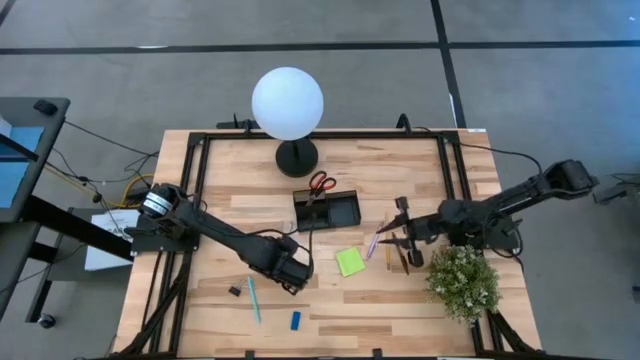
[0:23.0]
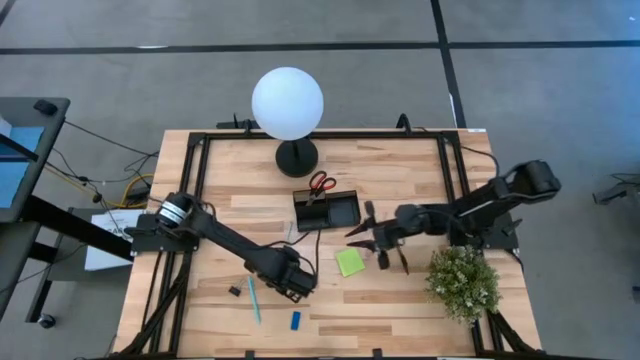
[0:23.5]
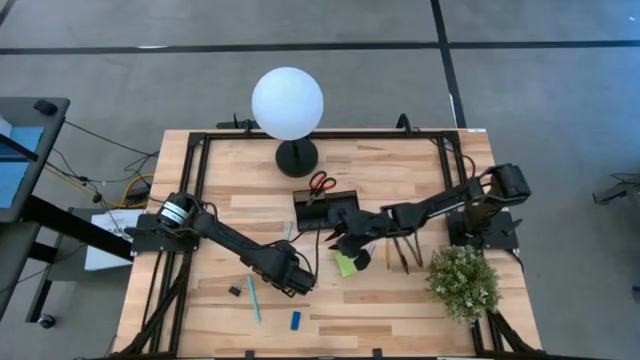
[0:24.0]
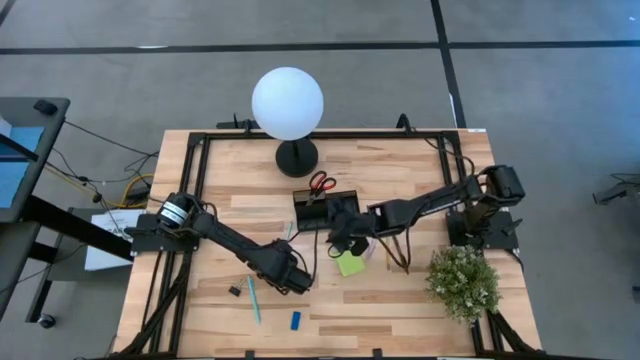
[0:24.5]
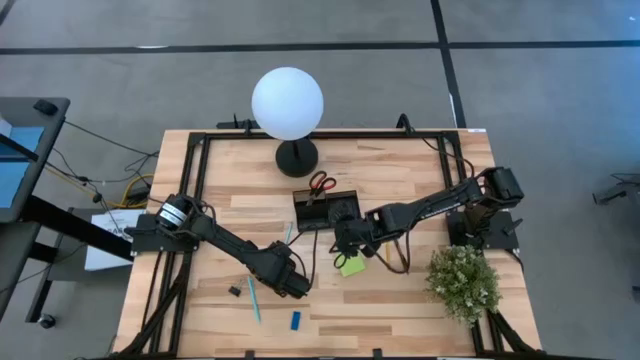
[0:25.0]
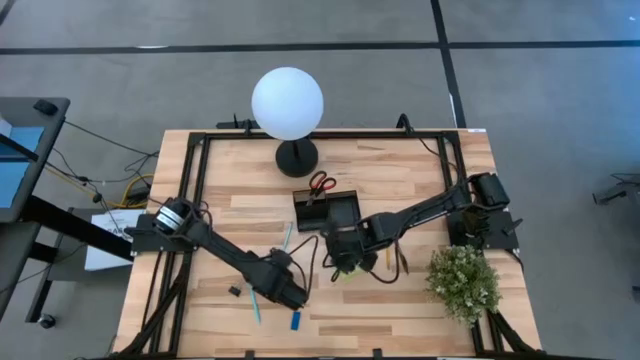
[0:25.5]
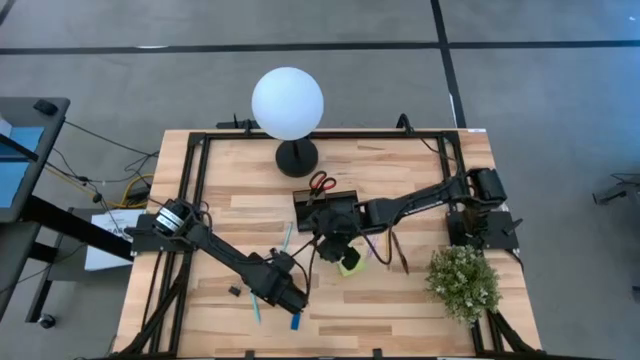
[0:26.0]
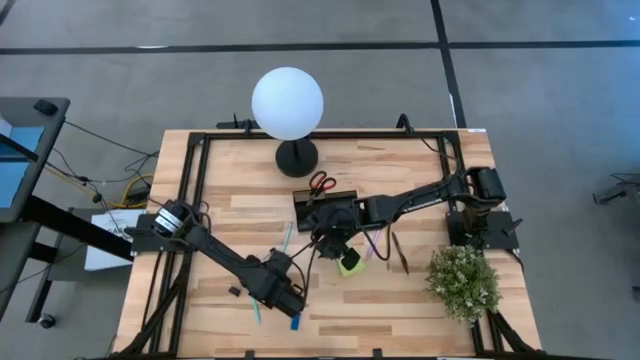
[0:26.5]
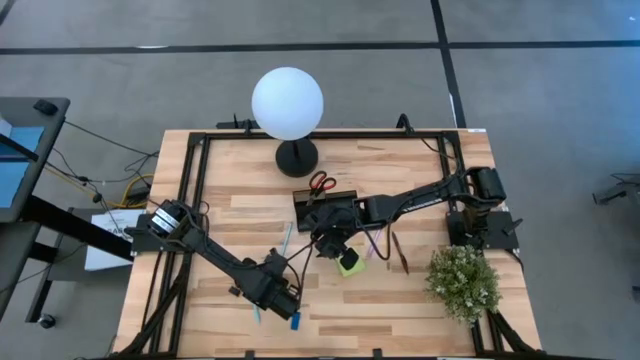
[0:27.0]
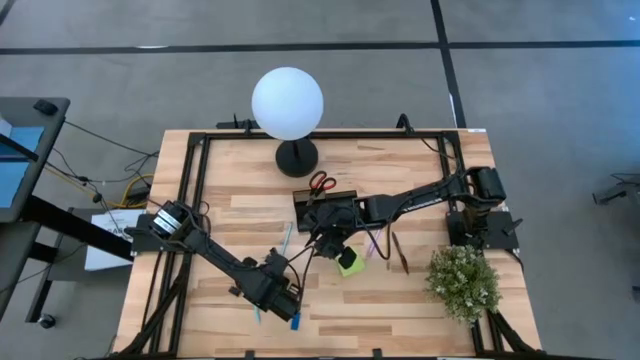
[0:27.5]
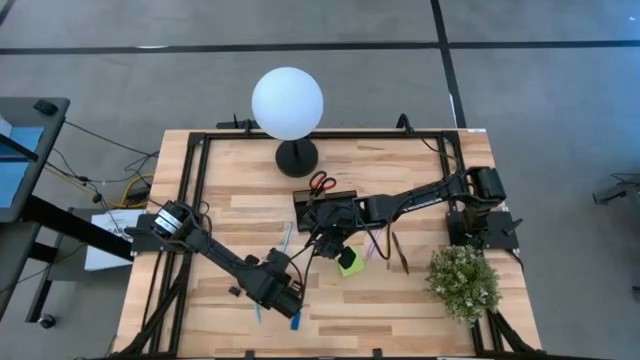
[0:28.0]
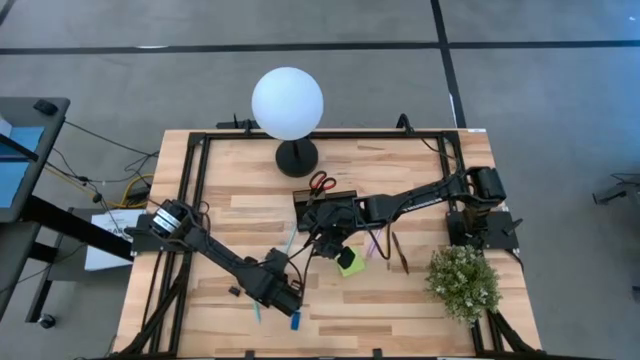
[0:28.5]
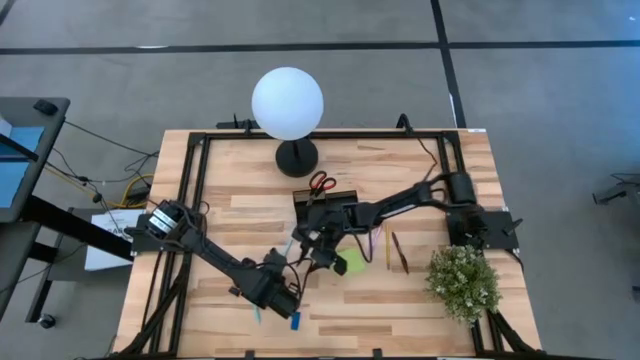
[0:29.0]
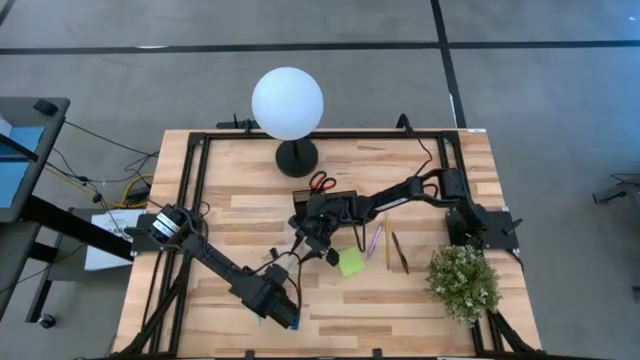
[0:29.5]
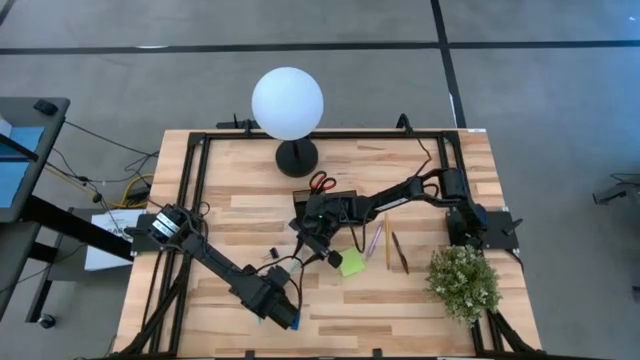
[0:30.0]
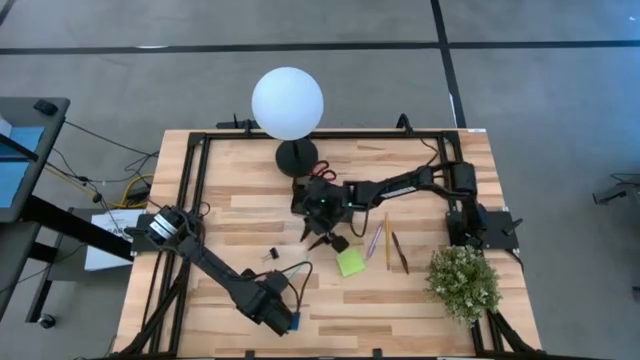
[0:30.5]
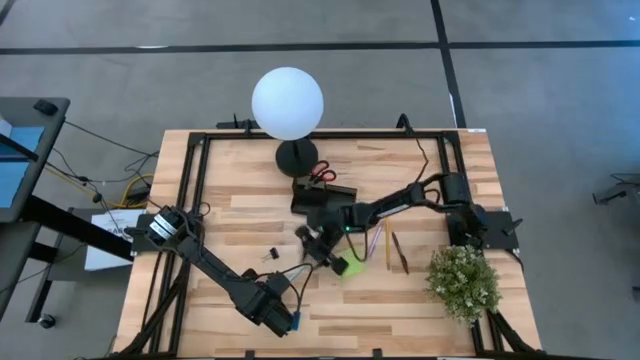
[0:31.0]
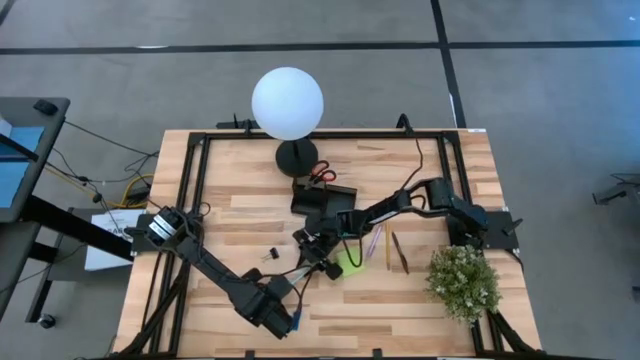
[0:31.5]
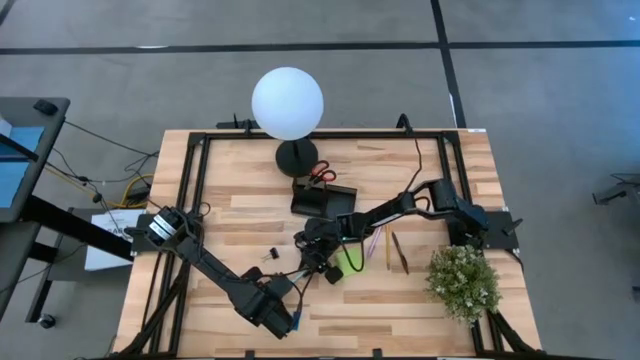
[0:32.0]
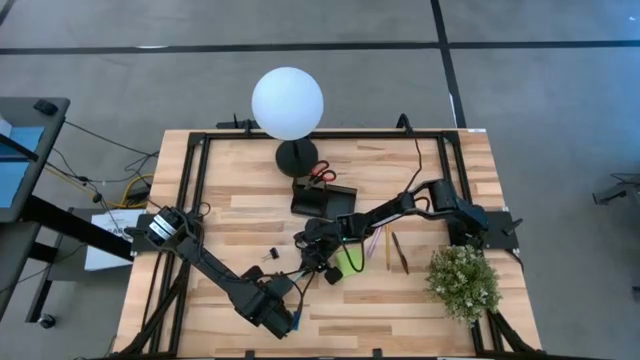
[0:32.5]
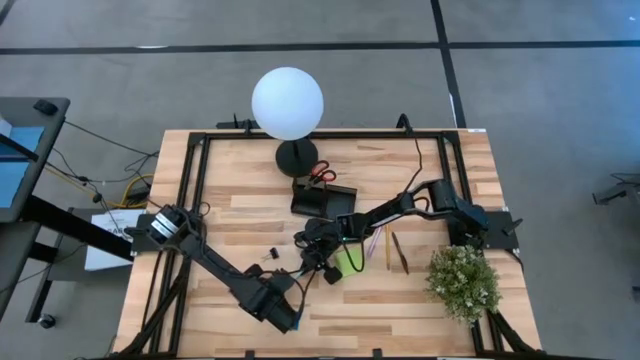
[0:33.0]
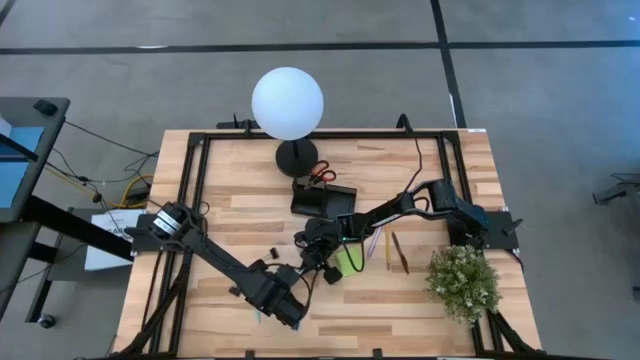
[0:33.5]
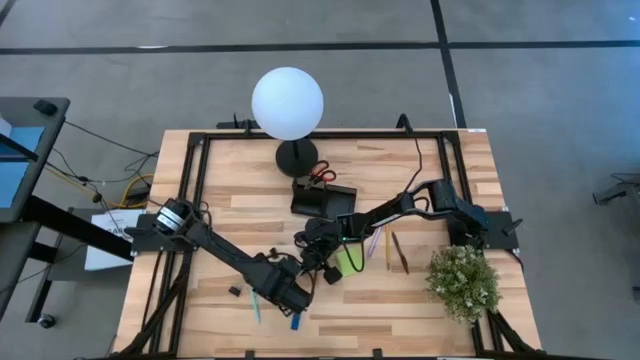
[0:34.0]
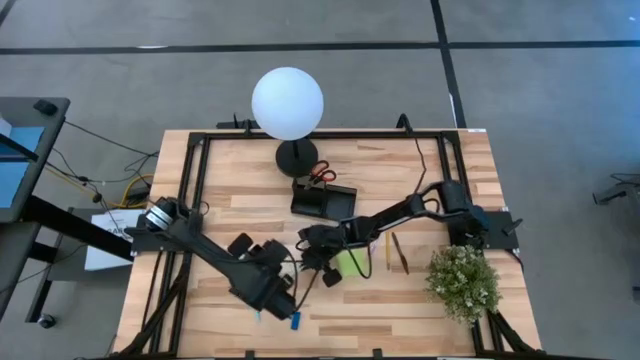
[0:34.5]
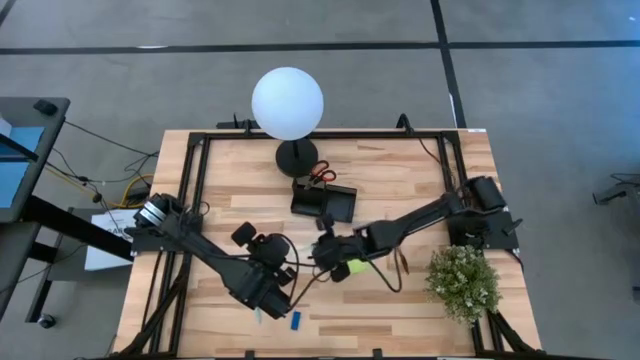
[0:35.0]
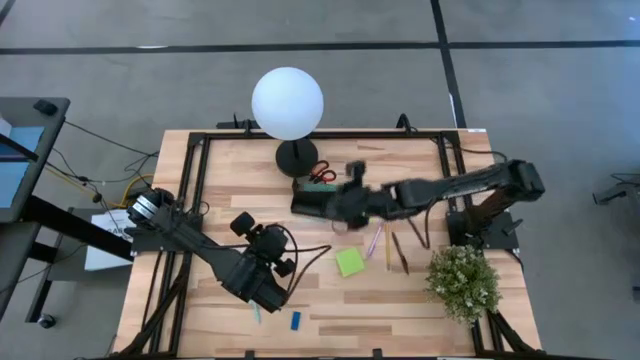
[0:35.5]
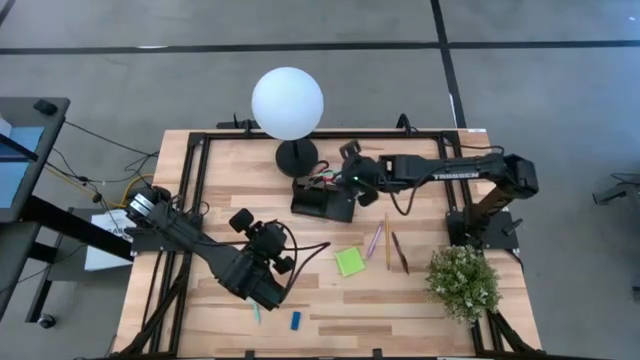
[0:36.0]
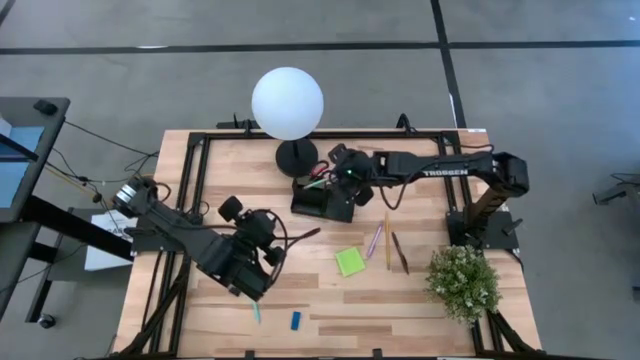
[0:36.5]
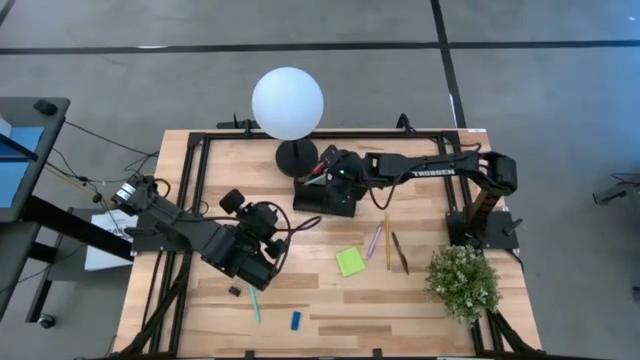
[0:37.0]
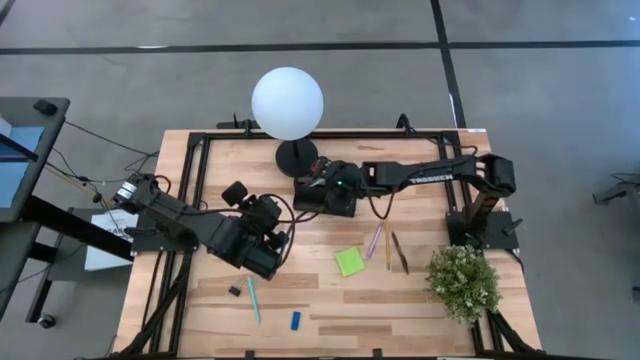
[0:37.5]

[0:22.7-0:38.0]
Task: Pick and place office supplies into organizer
Put the light blue pencil into the desk organizer

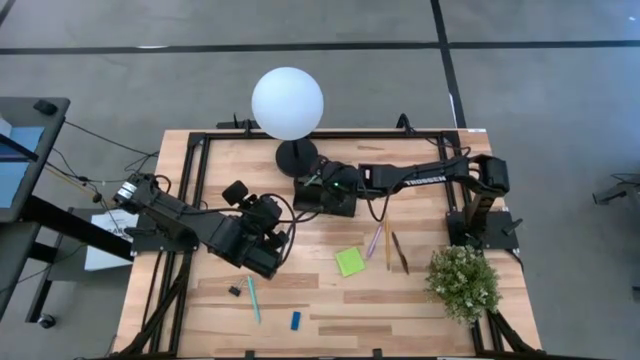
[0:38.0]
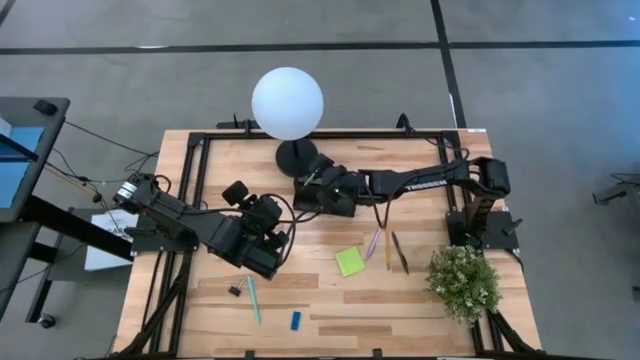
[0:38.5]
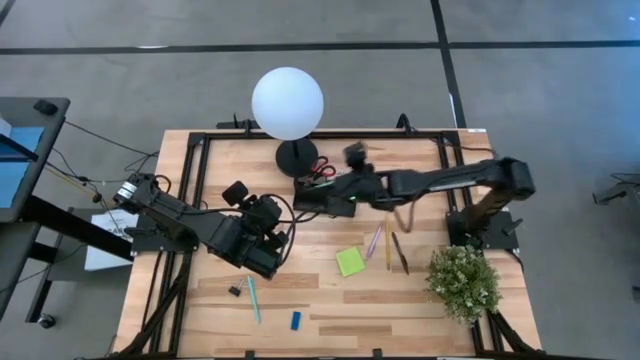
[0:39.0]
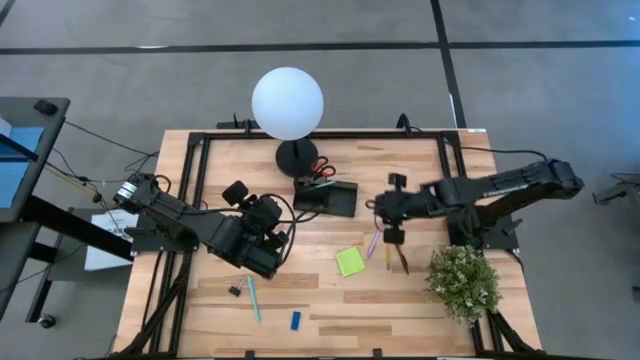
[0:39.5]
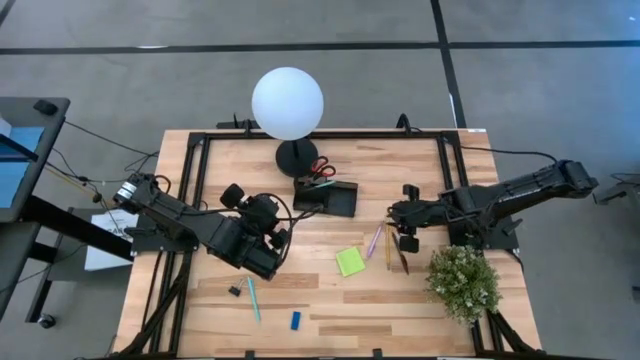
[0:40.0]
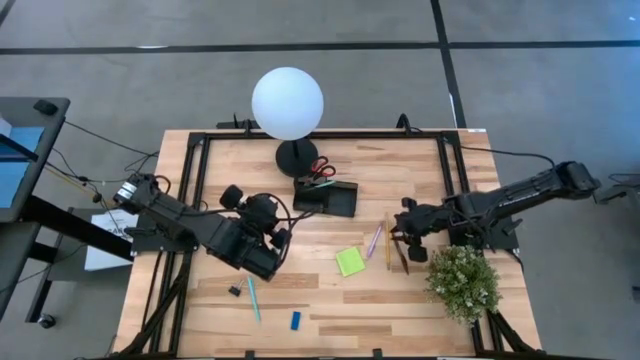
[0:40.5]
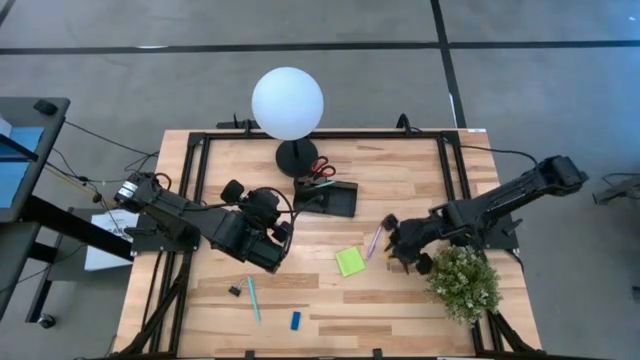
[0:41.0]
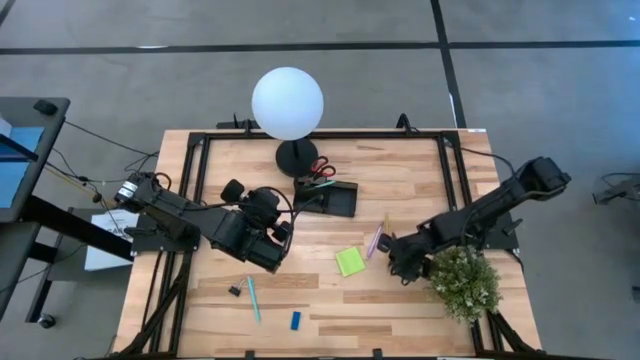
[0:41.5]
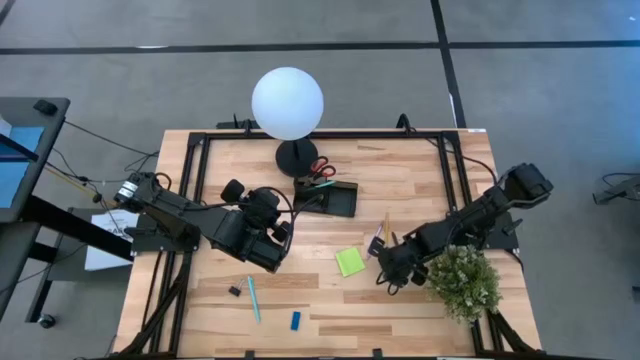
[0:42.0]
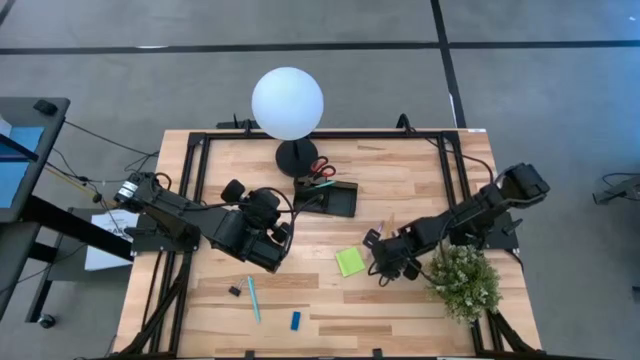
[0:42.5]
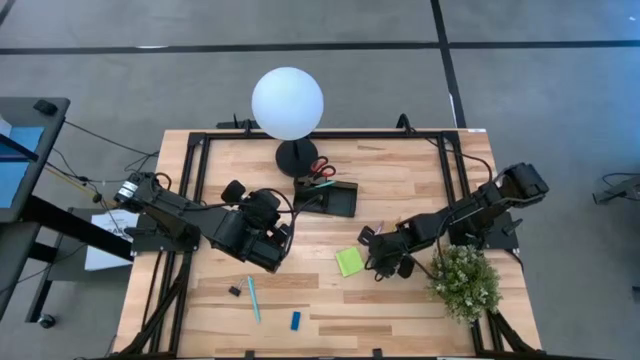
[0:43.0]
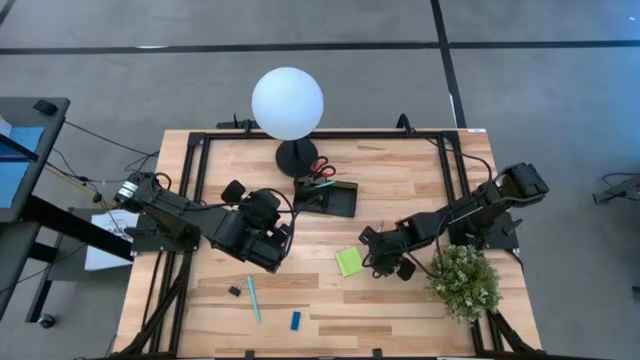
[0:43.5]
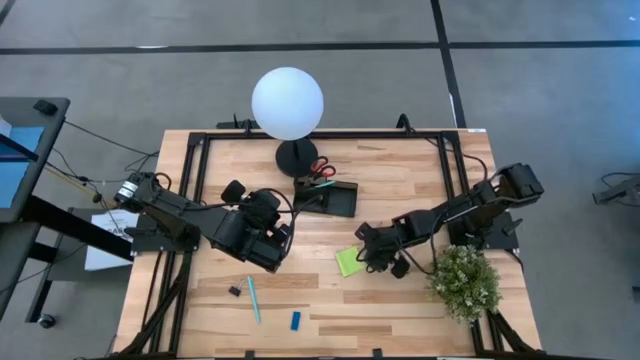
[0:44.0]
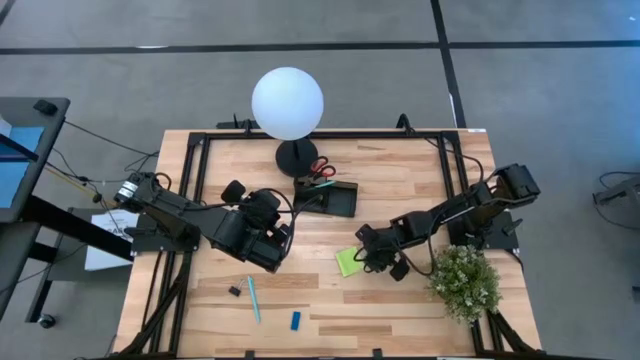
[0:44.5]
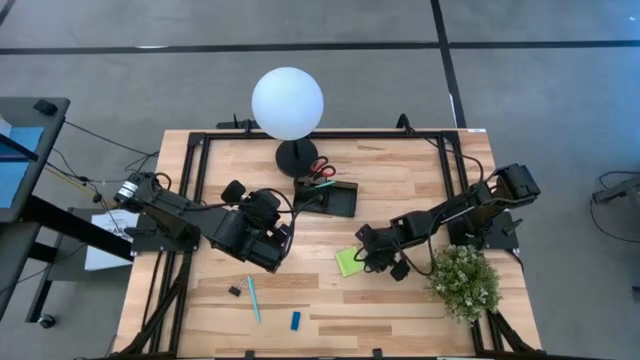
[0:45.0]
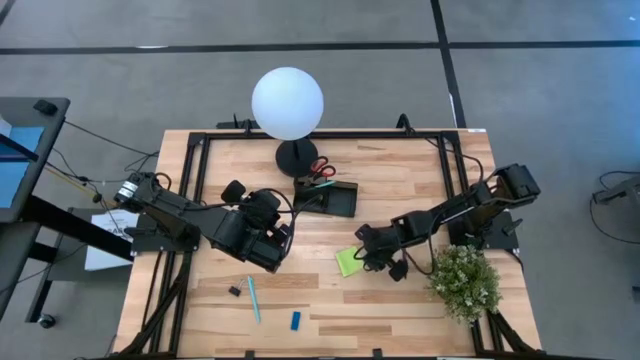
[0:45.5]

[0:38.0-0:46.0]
Put the yellow pencil into the desk organizer
